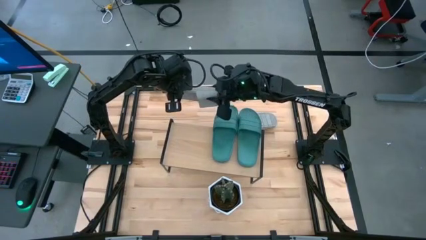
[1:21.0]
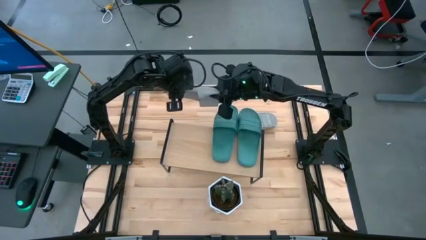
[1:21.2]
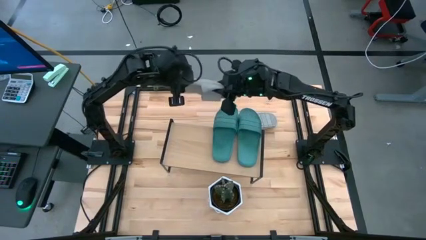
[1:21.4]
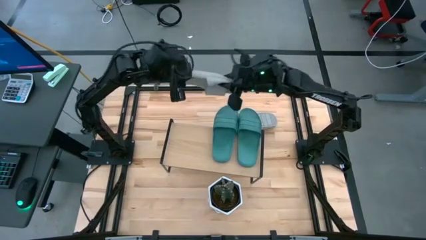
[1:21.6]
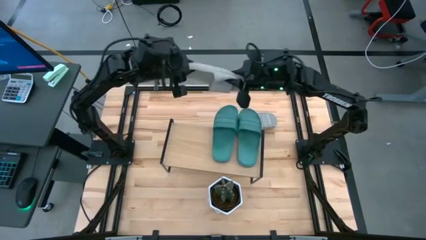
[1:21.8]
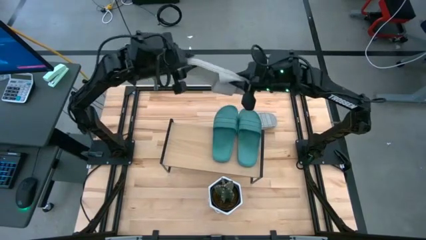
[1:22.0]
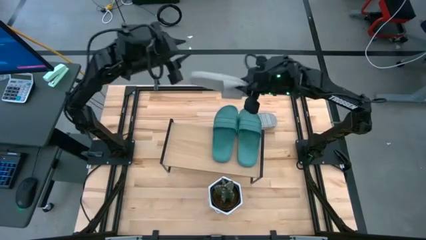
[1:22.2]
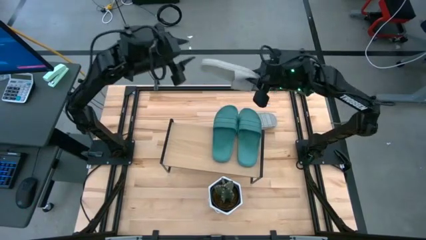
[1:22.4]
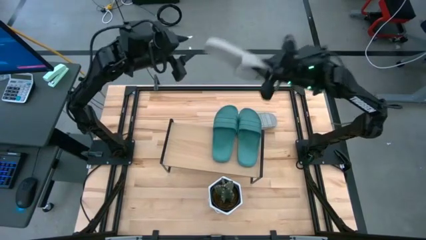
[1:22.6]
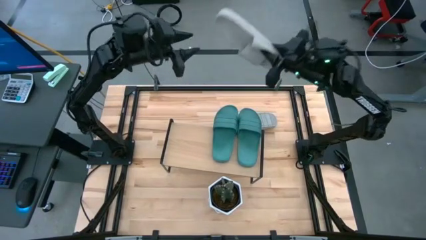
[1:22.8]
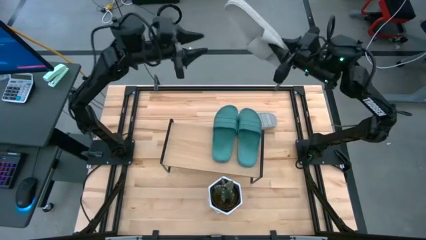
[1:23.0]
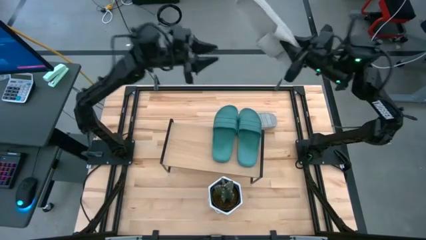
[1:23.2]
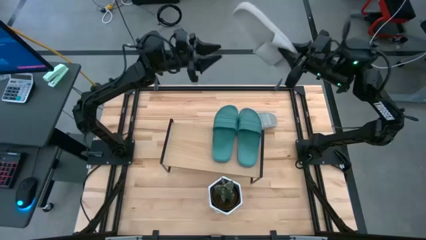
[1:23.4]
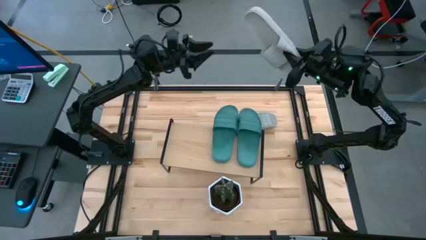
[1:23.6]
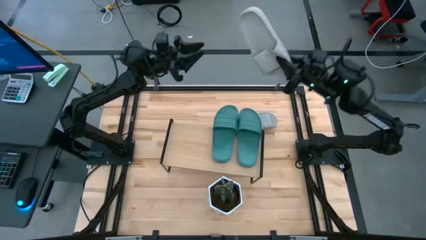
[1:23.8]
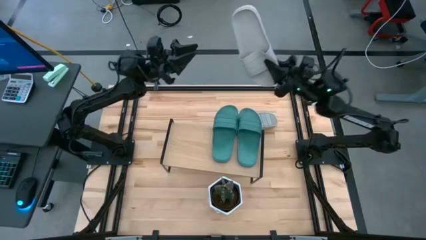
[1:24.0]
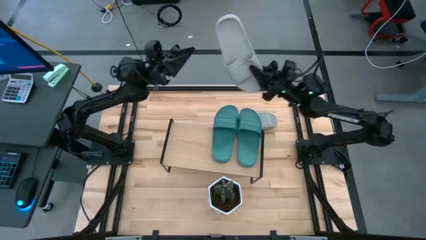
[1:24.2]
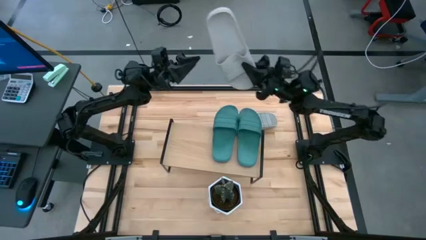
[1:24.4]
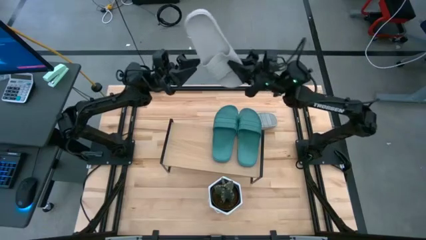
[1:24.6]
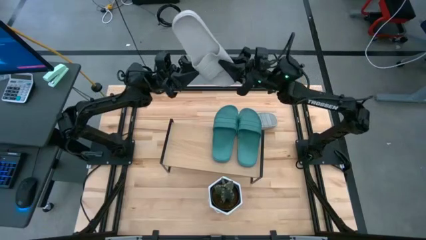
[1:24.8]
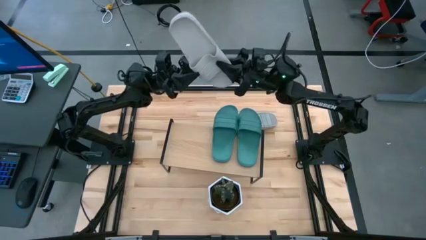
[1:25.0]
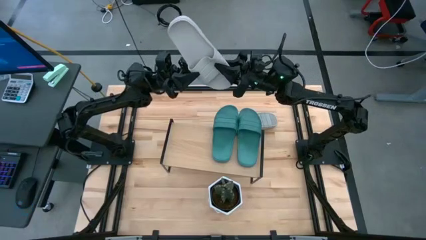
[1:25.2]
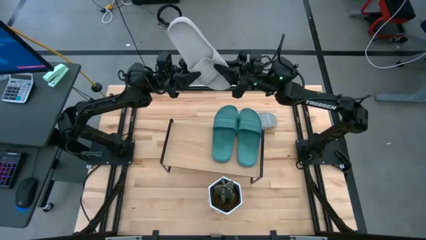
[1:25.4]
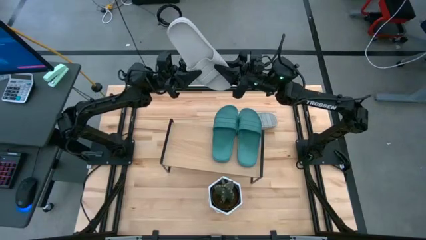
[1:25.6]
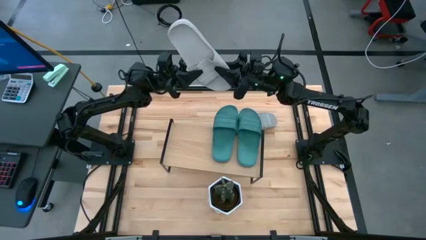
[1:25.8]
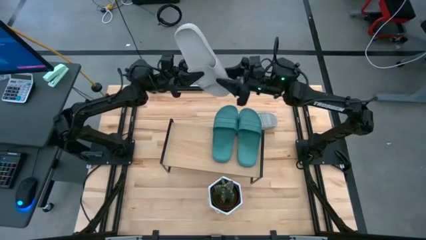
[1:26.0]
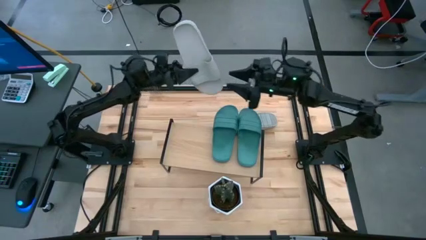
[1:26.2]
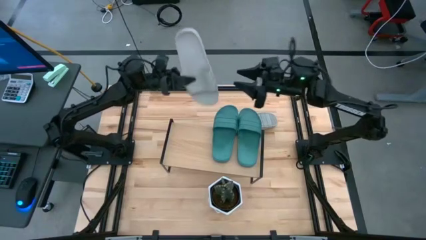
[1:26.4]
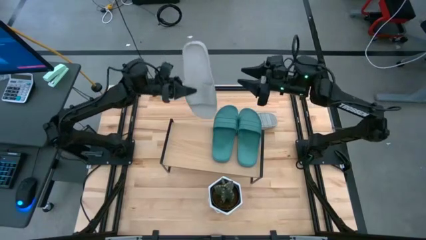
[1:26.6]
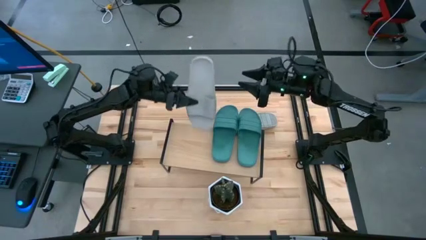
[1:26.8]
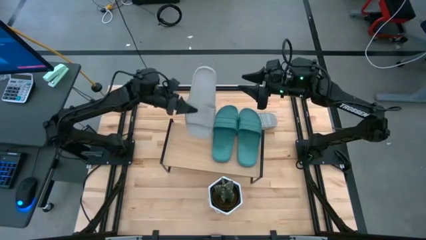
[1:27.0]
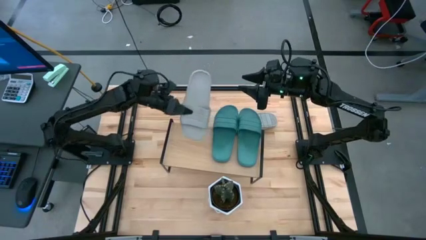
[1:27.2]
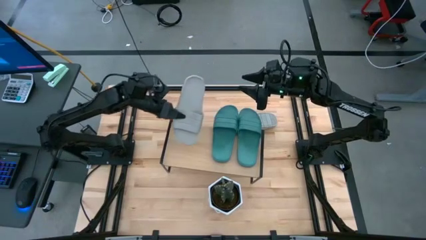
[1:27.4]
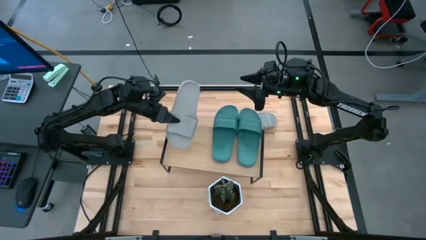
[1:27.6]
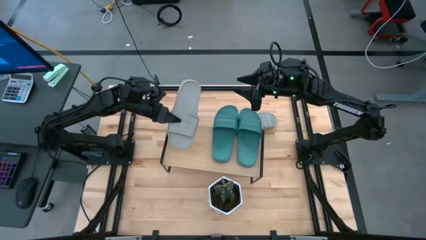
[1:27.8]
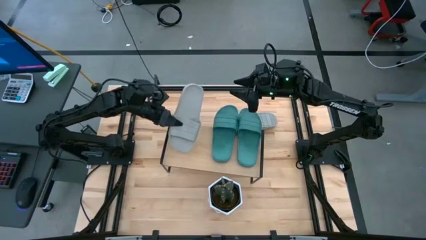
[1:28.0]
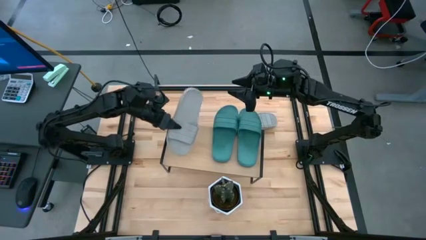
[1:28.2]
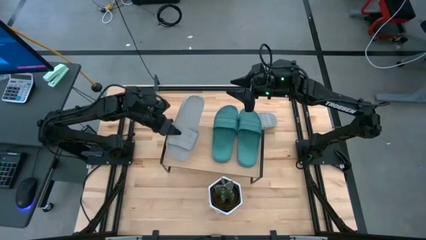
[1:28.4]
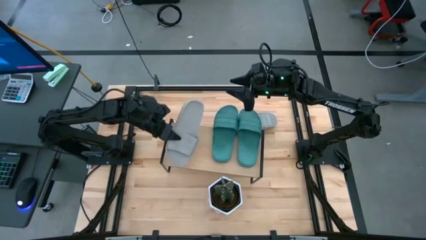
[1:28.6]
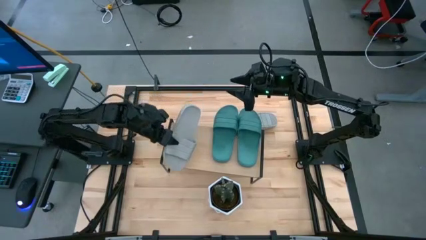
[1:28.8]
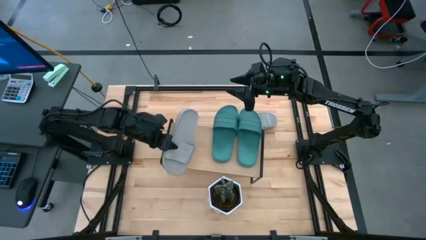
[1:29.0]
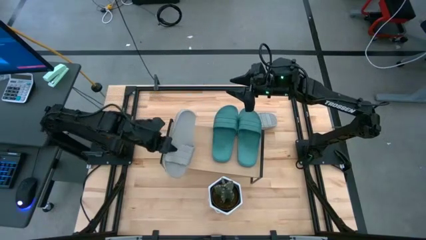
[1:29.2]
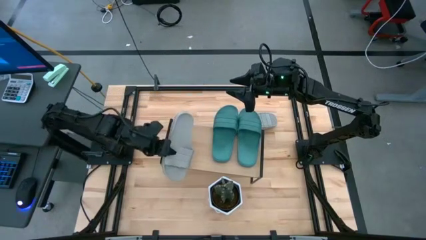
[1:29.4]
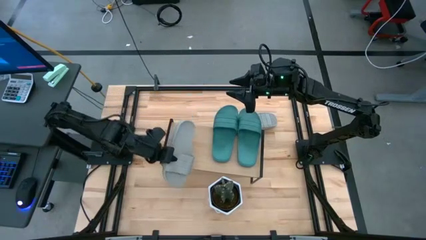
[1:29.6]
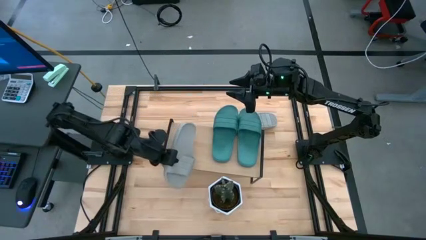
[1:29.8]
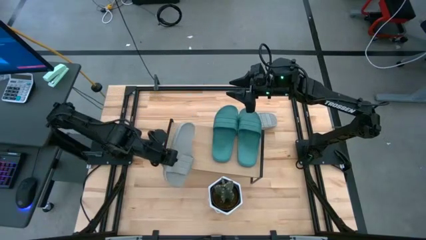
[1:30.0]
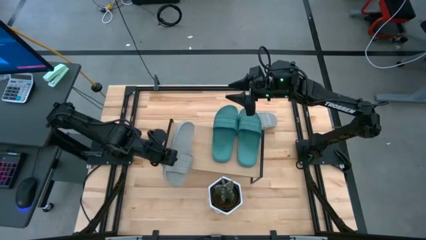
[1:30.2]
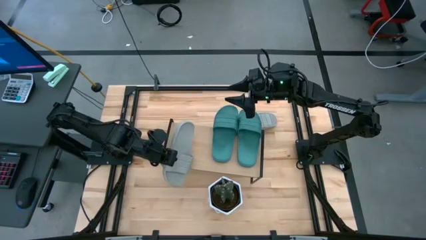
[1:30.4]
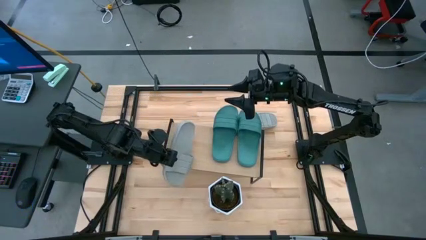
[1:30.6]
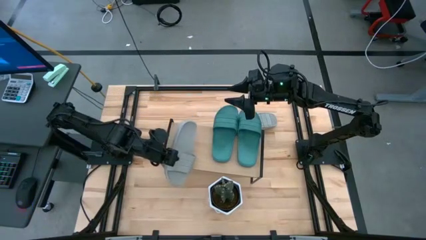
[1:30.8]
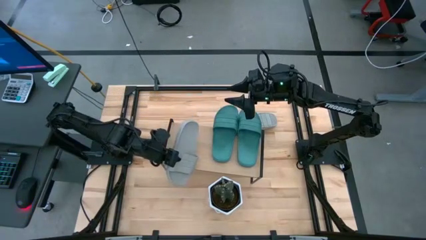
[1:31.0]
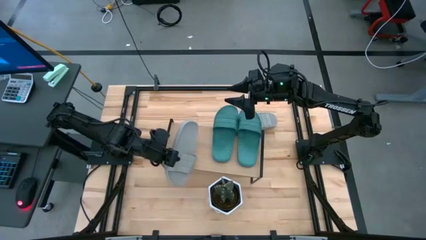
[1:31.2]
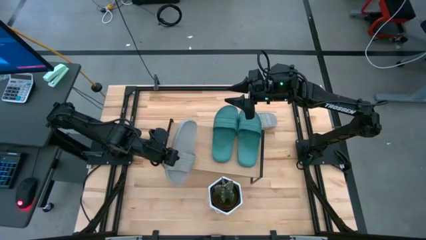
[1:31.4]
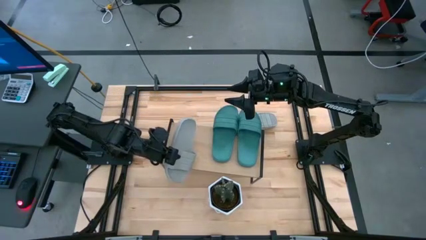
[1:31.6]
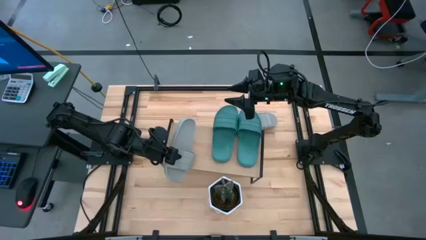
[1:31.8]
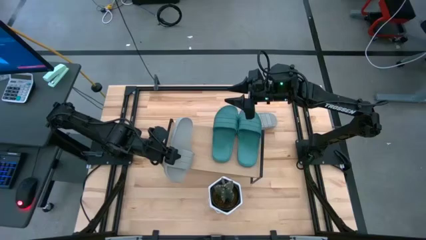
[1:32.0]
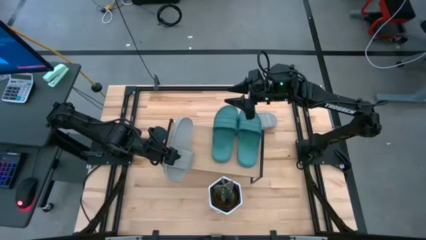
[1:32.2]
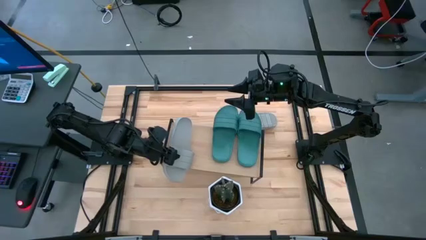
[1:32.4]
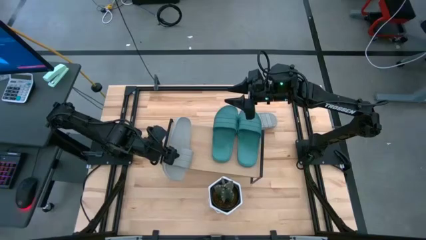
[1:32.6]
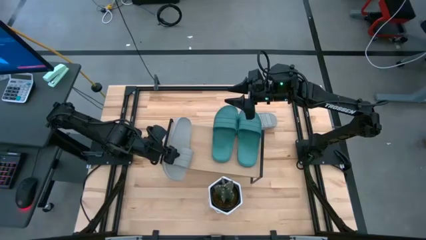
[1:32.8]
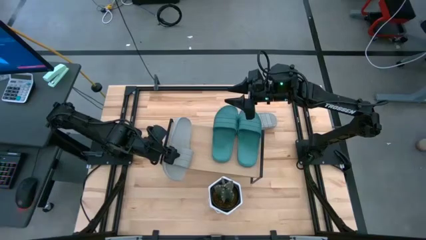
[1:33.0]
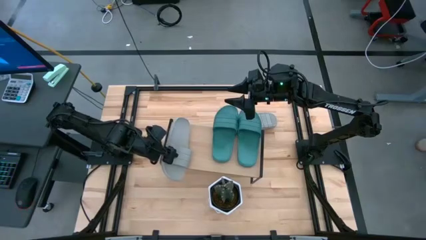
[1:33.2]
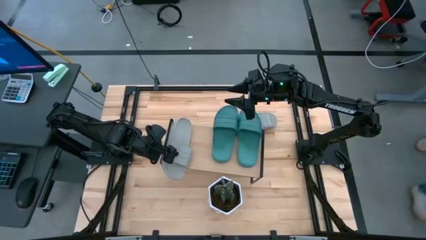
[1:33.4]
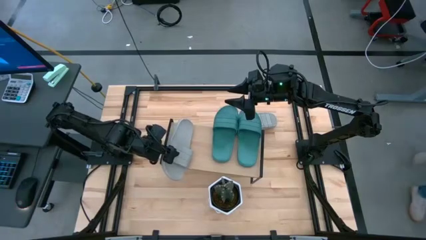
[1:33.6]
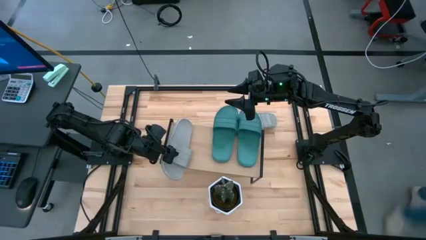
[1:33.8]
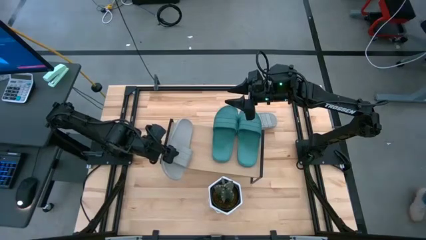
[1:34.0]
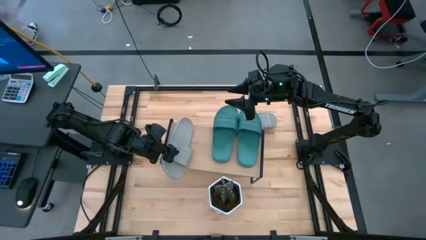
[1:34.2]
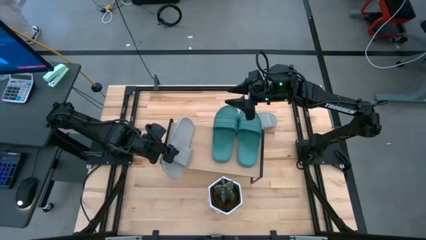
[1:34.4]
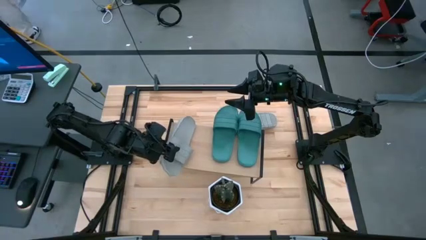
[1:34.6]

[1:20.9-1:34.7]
Task: Pick and place slides into the shelf
Put the bottom gray slide on the shelf

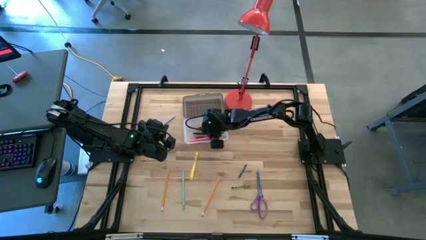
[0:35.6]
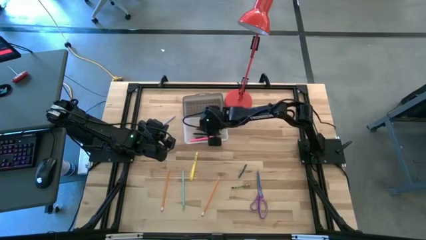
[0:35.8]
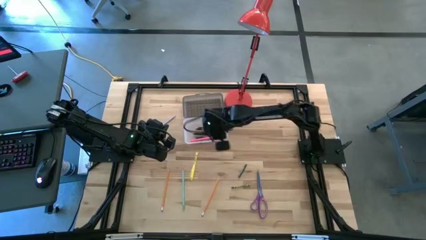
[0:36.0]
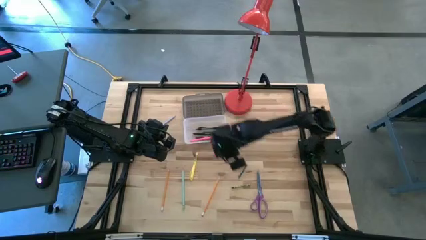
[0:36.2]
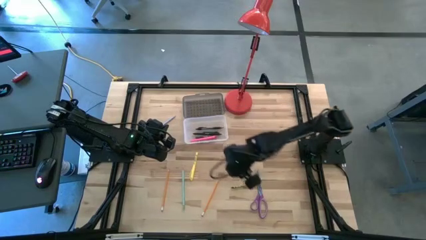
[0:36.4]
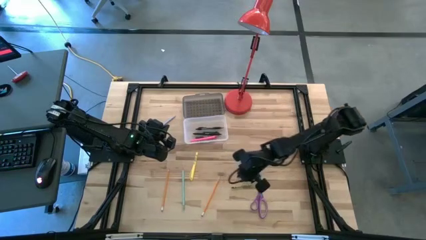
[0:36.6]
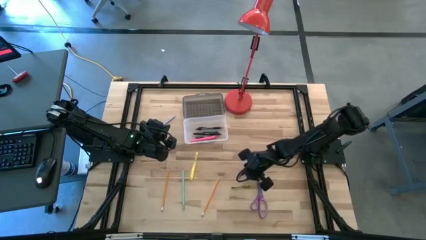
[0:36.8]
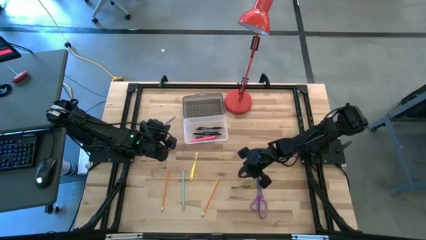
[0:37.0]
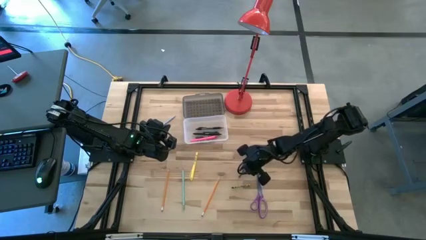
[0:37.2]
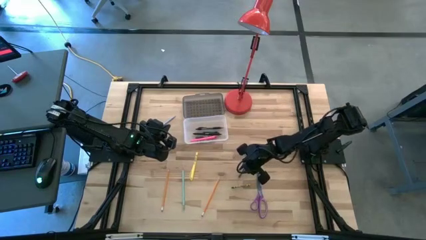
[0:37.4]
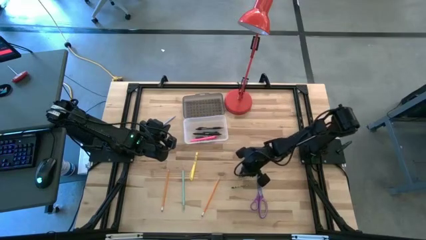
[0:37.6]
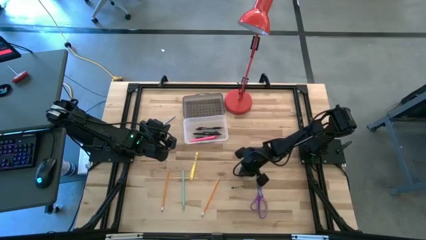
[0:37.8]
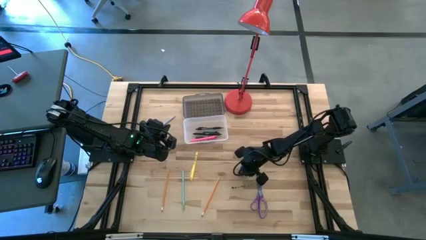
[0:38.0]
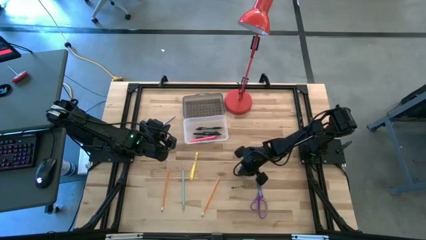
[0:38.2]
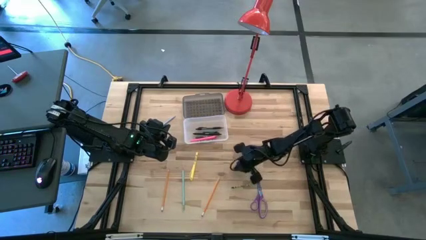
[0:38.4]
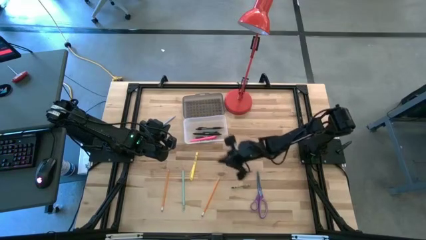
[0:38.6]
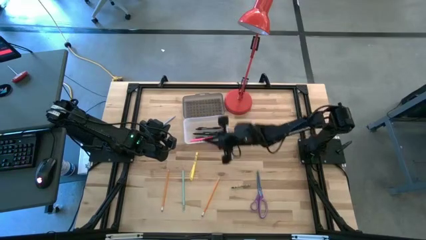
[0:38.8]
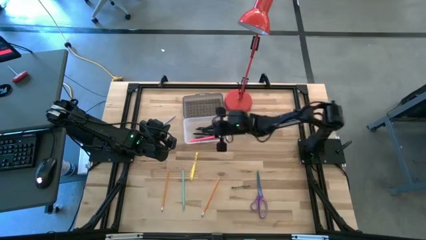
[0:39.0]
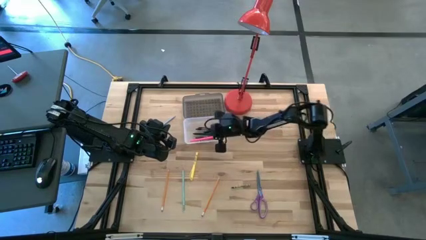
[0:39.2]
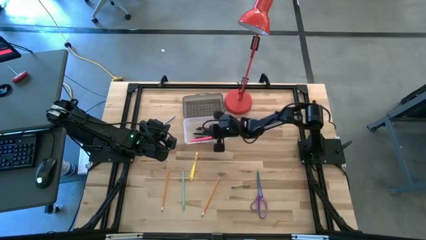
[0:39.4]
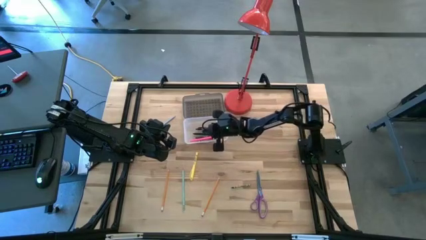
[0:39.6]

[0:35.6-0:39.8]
Task: Pick & place school supplies into a supply box
Put the dark green crayon into the black supply box
